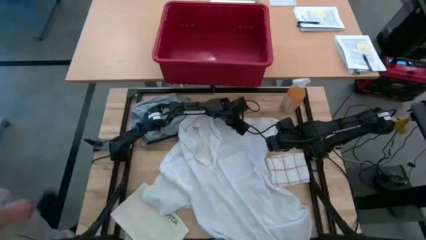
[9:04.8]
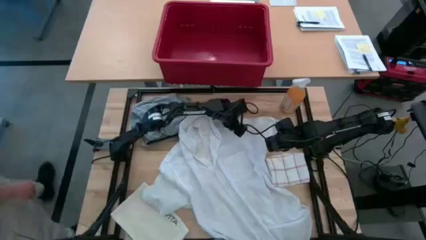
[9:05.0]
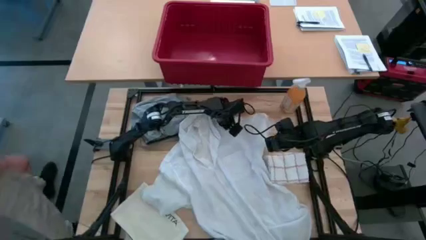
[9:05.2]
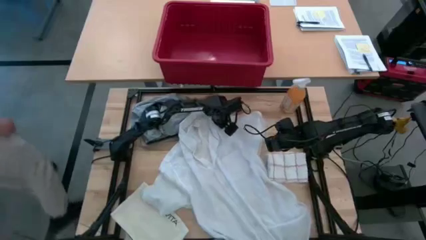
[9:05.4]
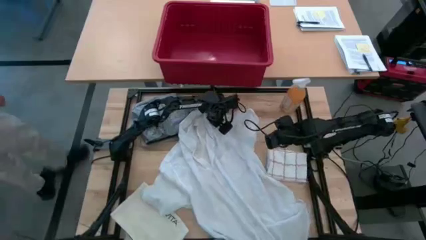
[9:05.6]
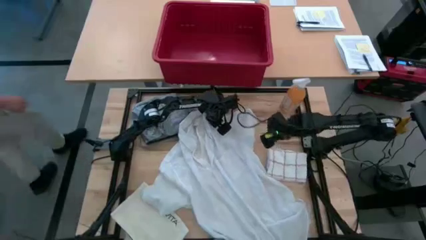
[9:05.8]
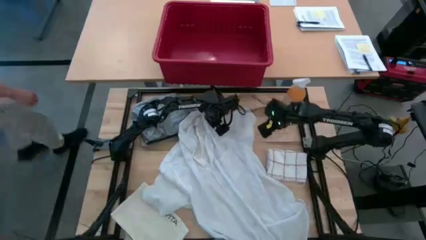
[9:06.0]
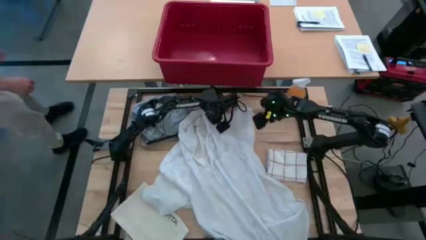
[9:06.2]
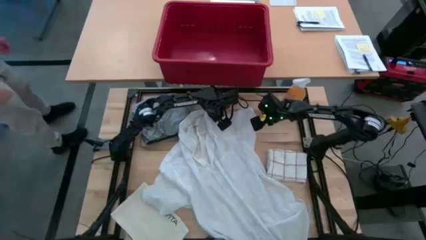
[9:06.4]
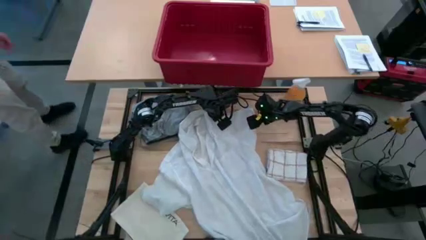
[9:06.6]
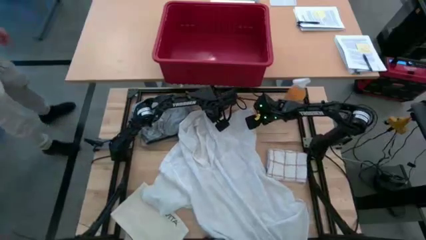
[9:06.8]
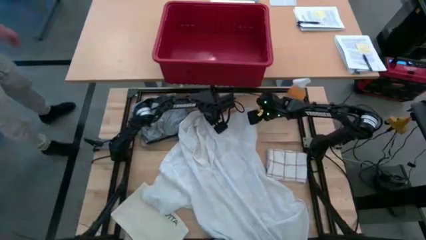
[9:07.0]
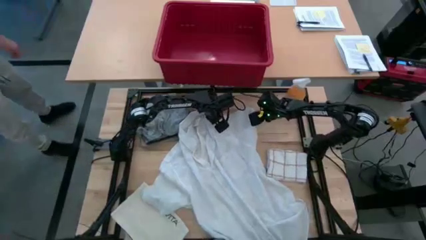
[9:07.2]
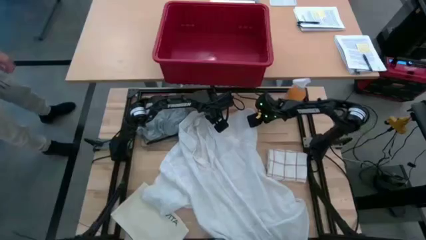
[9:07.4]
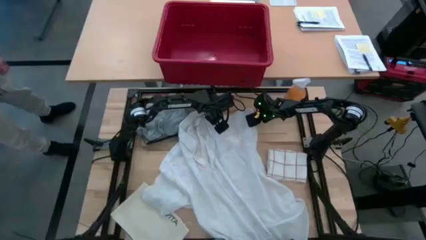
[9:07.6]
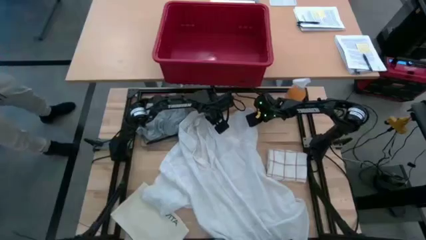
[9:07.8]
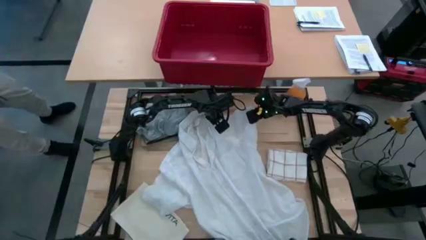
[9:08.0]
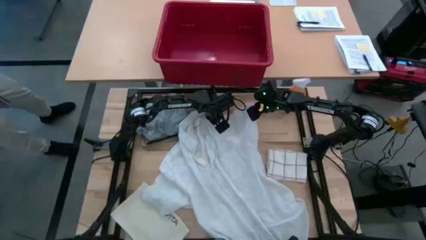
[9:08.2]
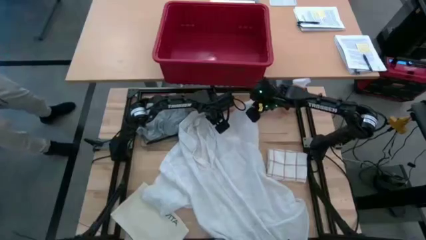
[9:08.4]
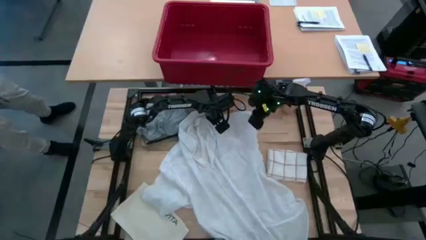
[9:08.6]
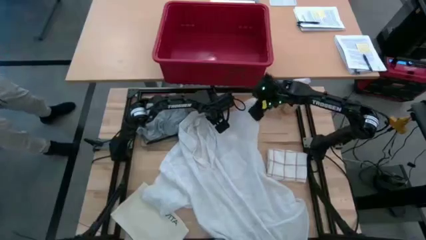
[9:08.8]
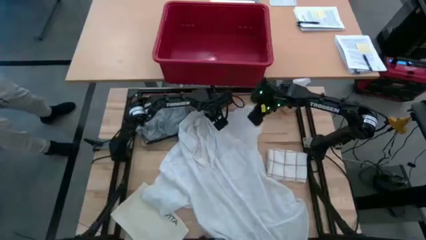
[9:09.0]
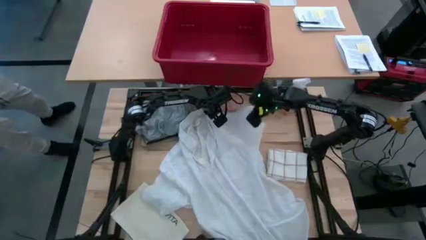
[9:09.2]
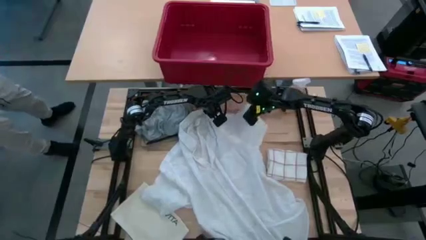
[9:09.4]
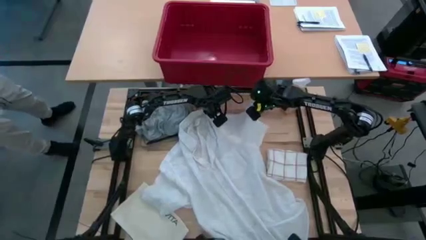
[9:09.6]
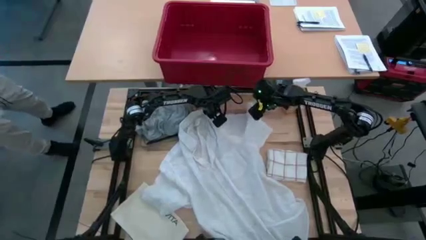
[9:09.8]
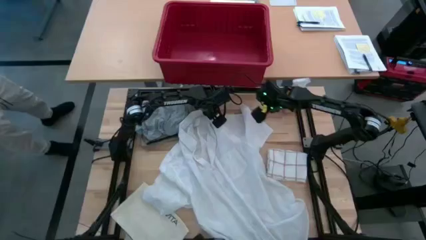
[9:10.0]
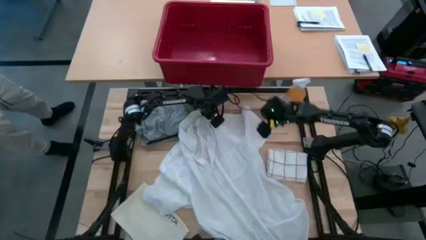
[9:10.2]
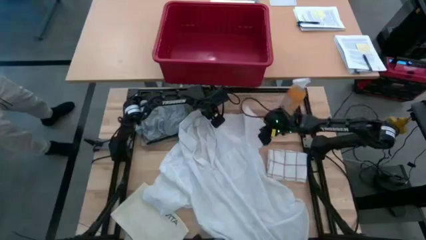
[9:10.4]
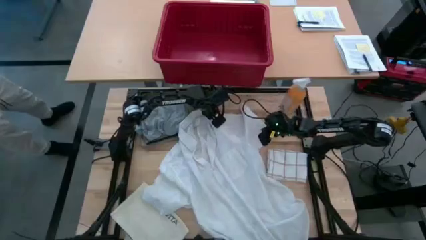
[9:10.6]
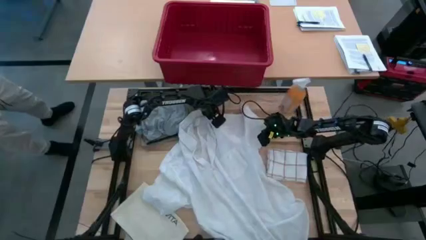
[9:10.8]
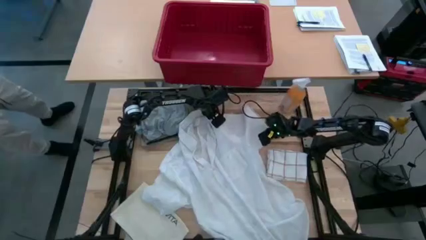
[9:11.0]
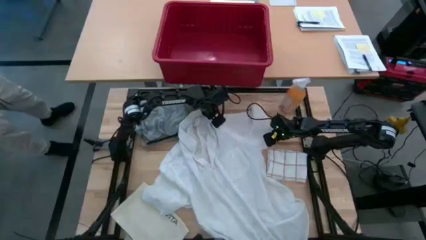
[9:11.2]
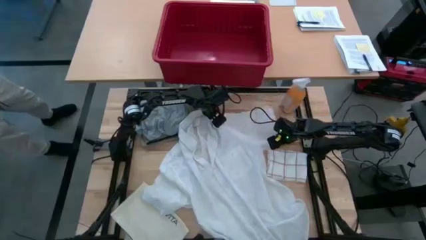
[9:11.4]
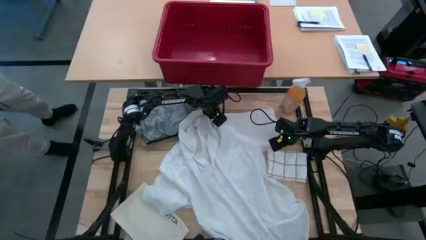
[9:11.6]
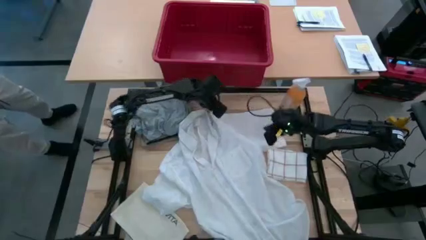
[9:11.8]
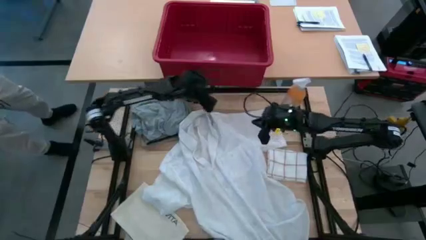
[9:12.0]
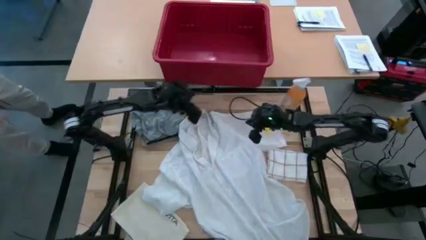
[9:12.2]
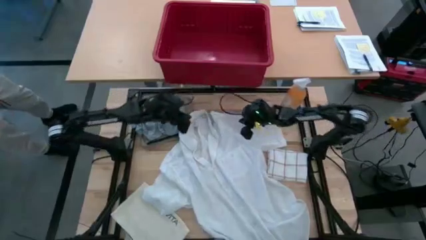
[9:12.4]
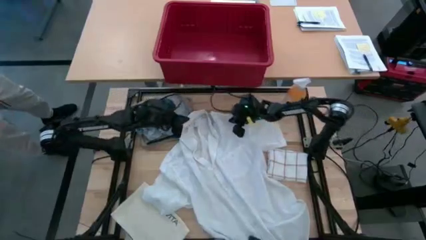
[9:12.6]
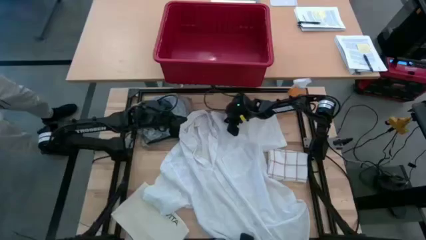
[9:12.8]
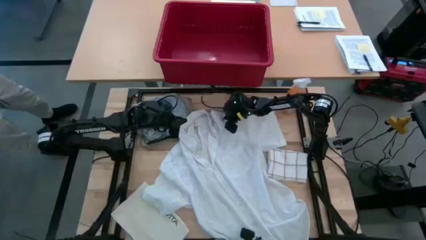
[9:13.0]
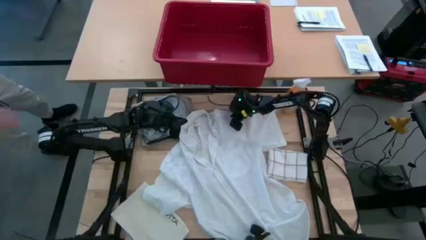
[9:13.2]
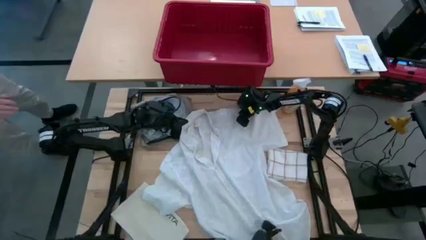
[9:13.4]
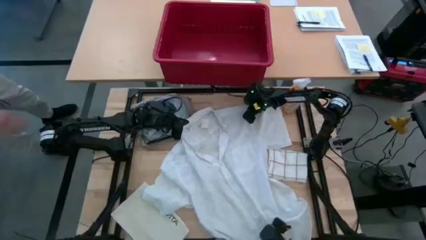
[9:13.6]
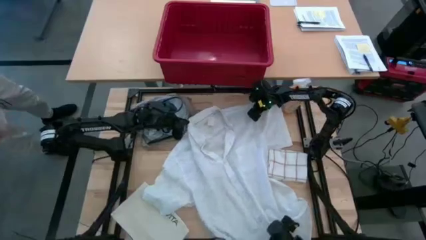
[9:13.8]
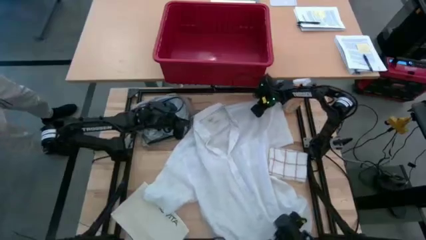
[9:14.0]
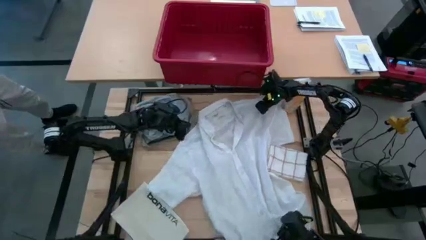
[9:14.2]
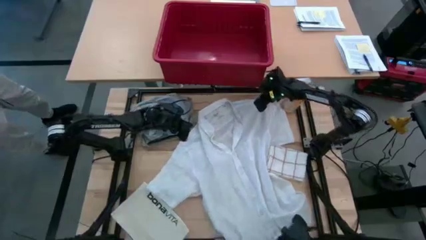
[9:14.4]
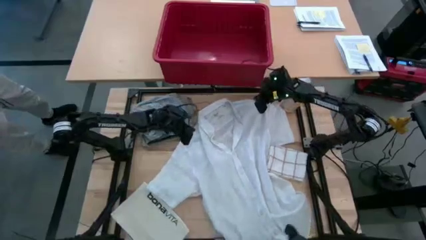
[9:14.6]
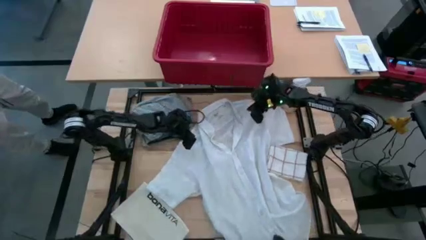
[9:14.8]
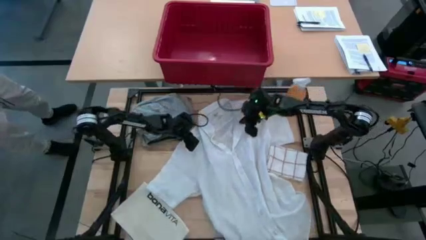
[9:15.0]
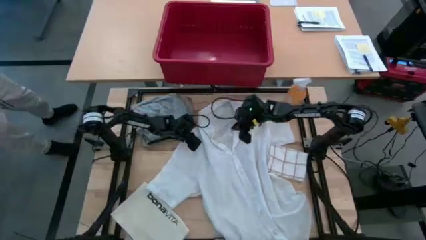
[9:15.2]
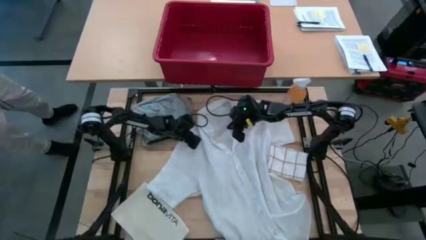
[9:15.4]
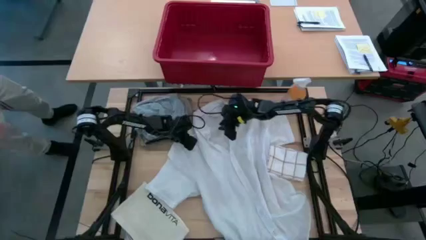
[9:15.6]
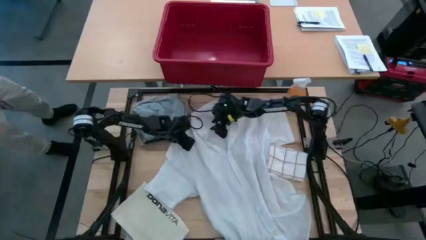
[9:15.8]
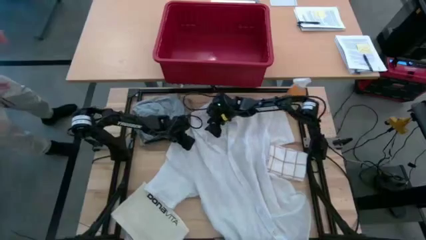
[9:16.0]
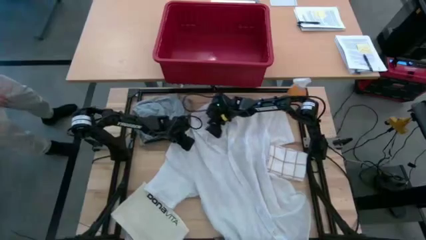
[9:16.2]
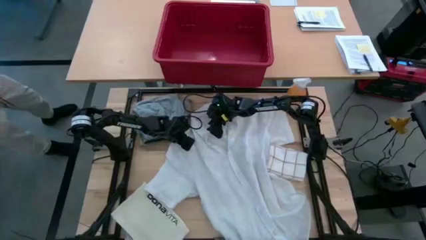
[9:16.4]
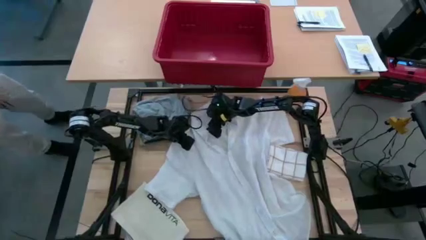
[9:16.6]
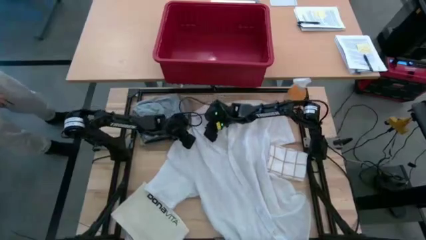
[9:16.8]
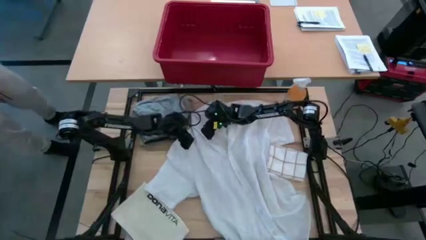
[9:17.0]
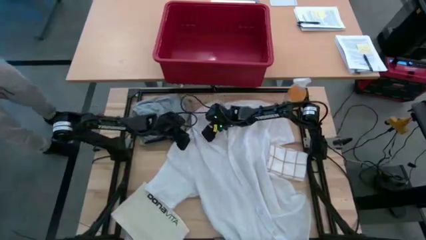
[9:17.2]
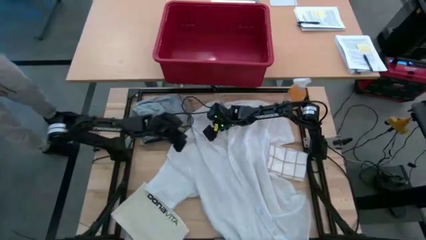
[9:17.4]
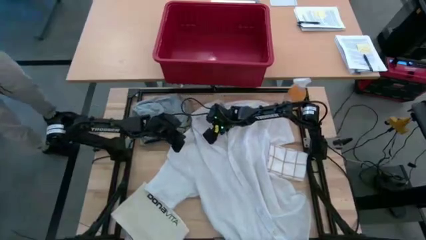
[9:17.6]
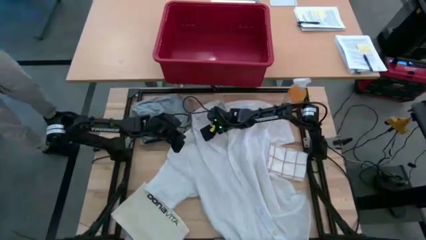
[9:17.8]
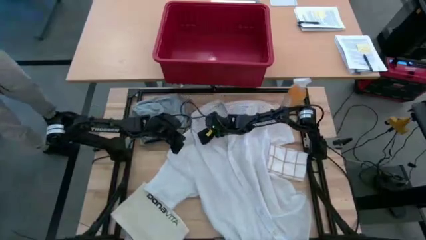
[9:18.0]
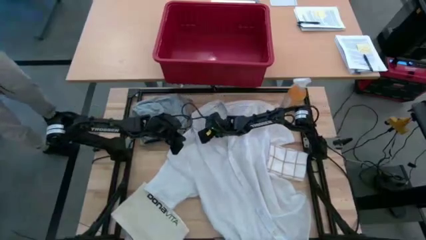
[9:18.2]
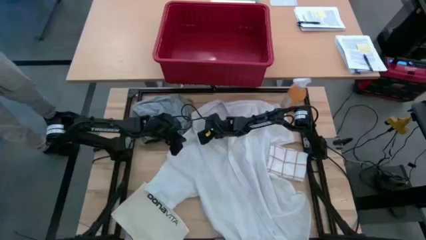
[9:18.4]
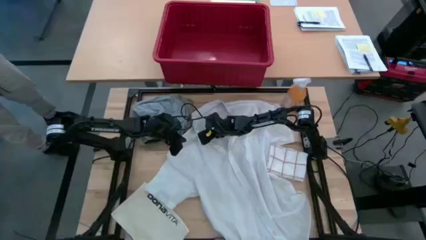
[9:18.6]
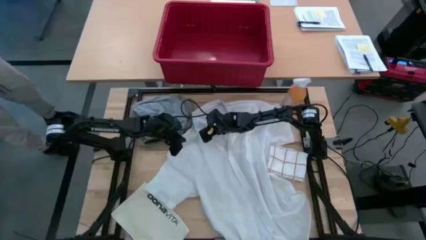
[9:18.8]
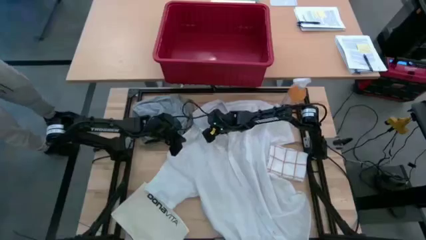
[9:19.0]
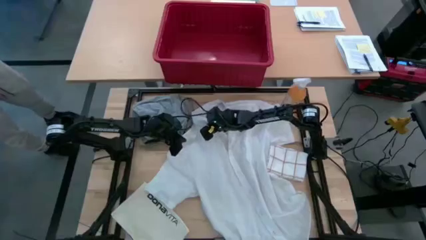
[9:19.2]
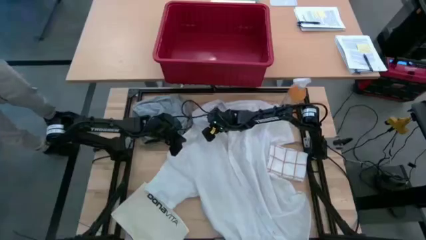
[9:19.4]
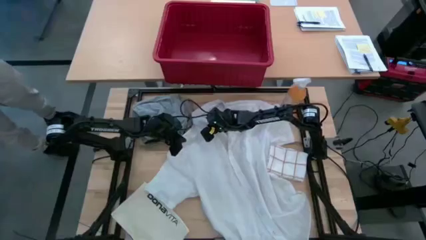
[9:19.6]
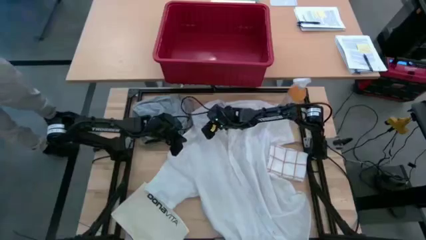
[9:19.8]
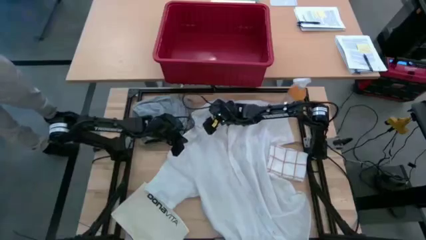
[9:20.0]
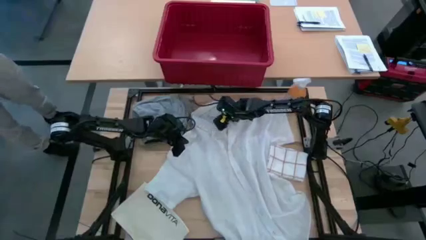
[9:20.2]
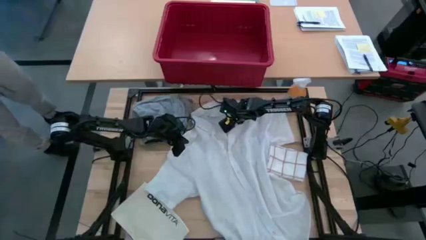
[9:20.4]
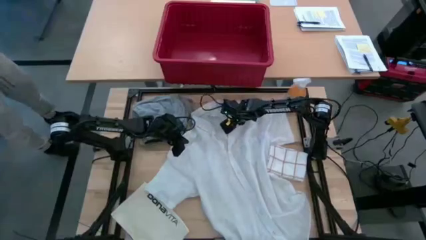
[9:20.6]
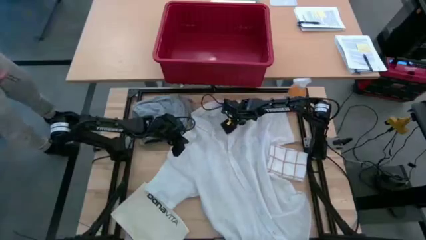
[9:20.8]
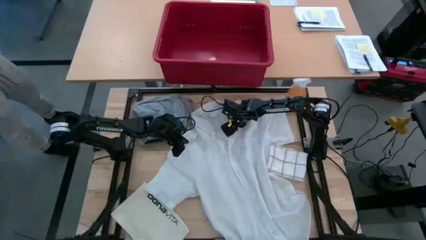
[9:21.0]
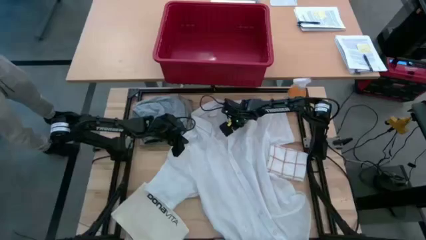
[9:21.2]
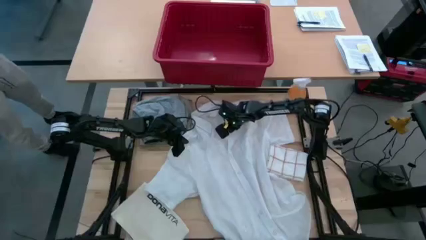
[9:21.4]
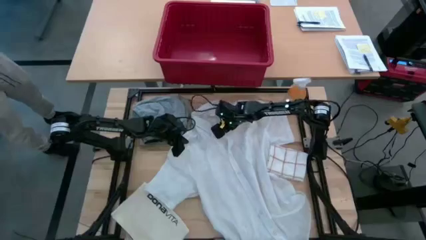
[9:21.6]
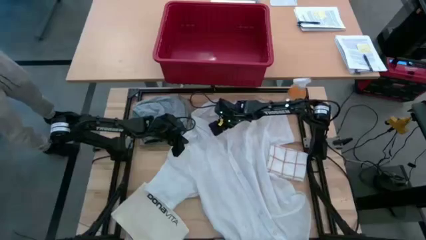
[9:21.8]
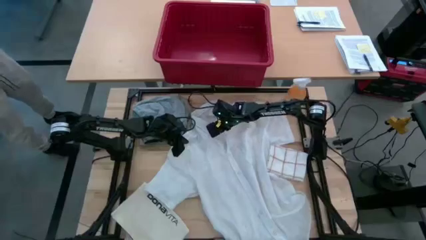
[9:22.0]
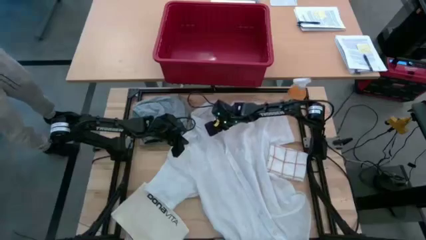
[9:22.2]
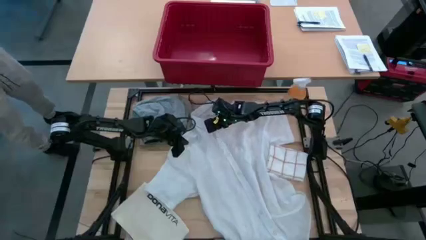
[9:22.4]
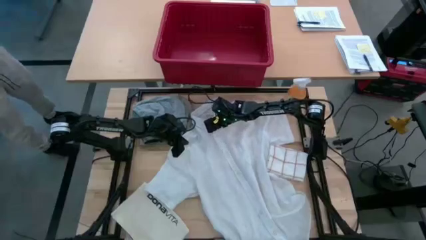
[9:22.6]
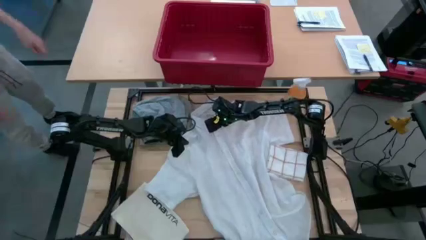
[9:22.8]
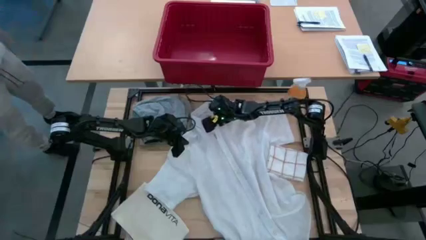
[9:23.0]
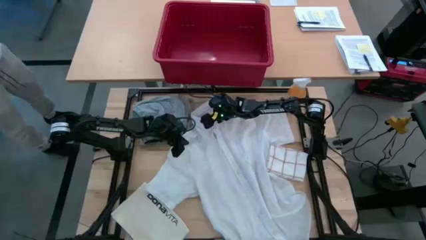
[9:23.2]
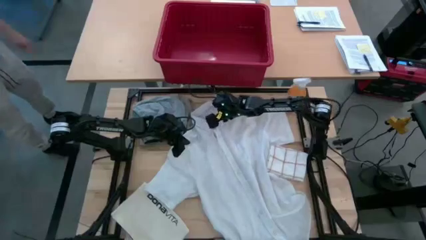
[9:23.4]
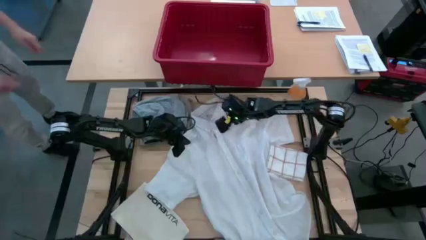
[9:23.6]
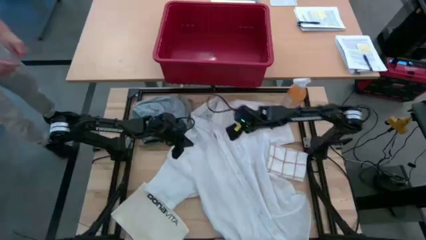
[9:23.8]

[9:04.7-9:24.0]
Task: Fold laundry
Fold the white long sleeve shirt
